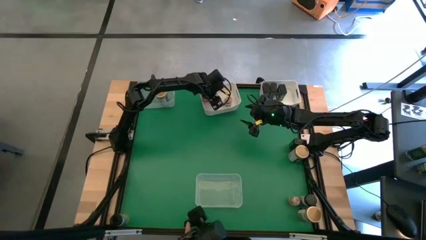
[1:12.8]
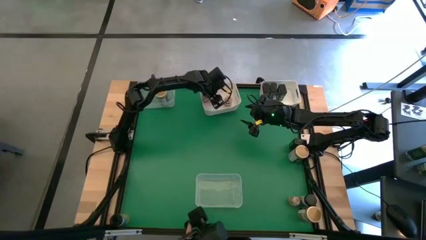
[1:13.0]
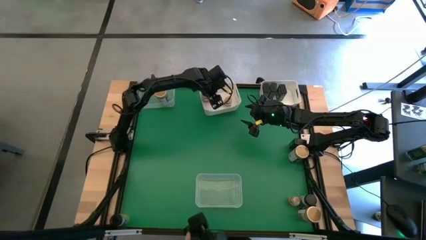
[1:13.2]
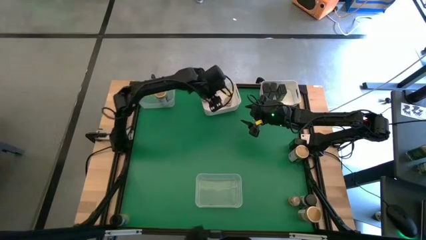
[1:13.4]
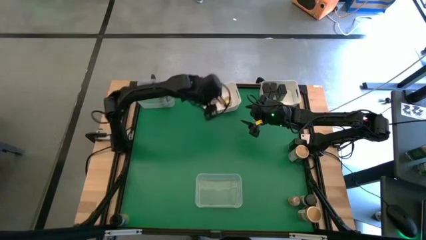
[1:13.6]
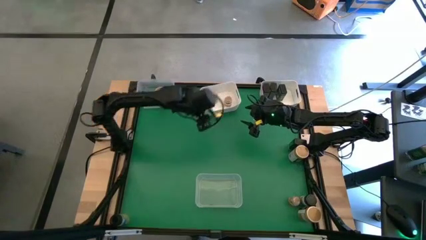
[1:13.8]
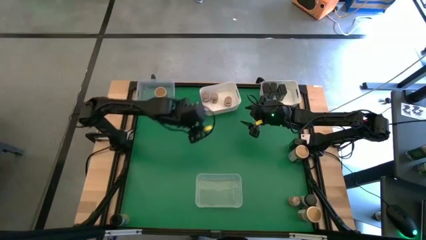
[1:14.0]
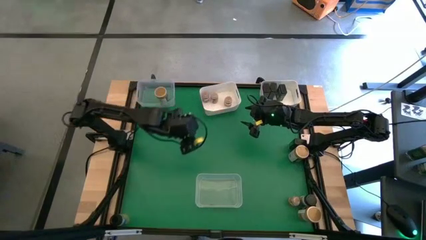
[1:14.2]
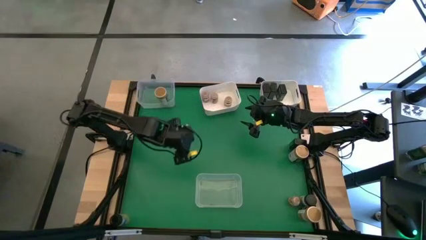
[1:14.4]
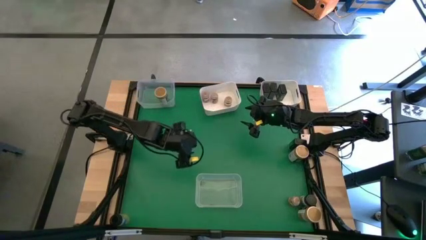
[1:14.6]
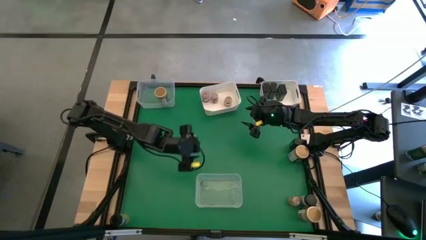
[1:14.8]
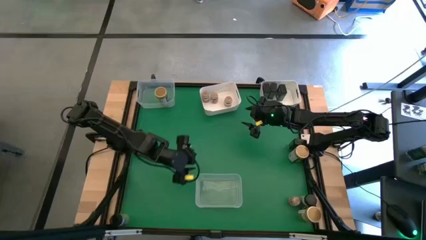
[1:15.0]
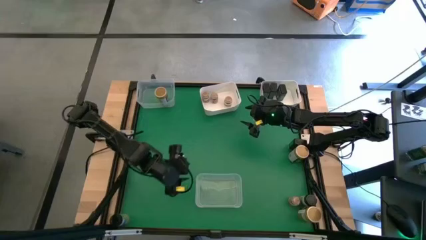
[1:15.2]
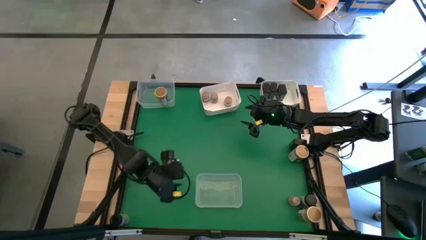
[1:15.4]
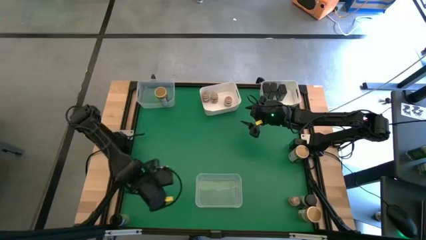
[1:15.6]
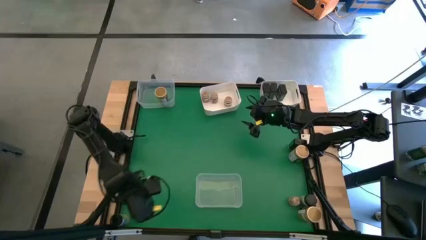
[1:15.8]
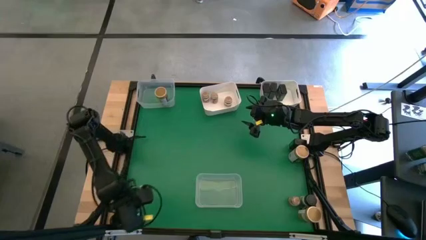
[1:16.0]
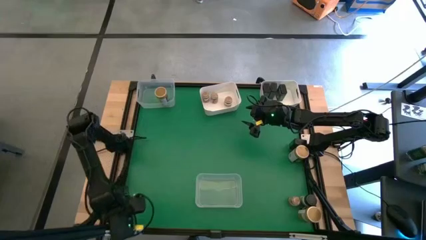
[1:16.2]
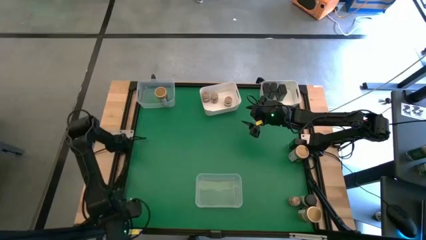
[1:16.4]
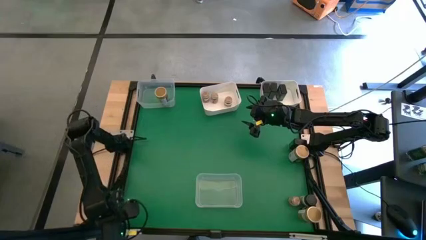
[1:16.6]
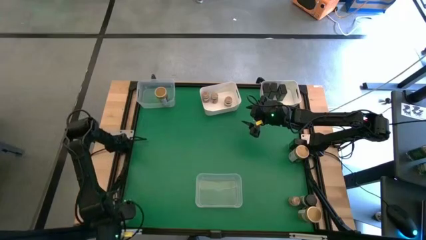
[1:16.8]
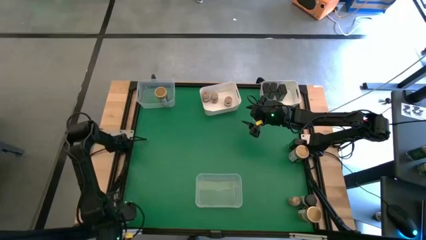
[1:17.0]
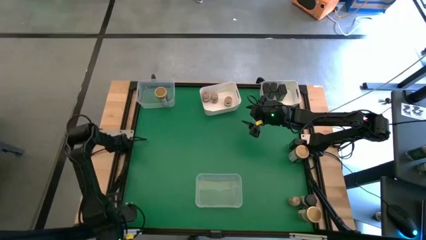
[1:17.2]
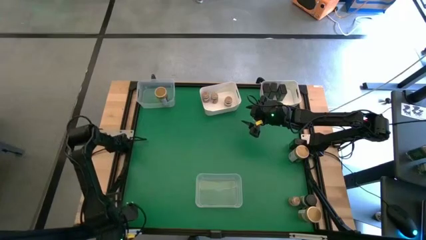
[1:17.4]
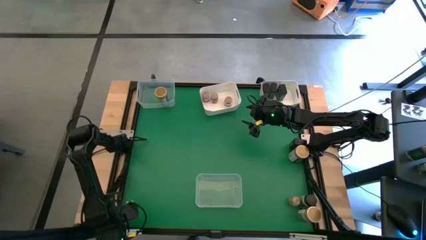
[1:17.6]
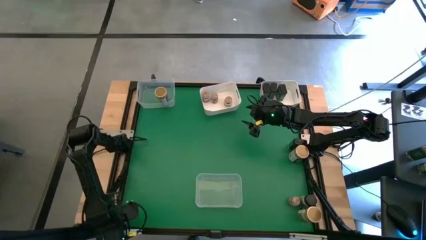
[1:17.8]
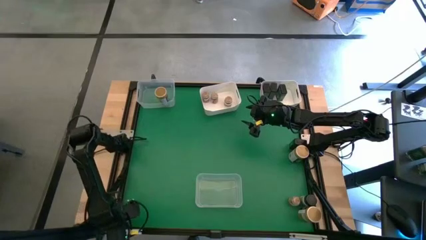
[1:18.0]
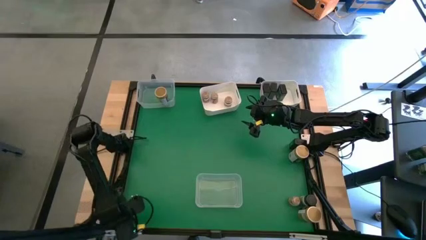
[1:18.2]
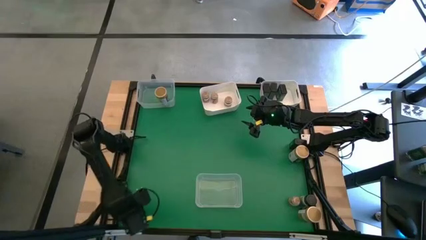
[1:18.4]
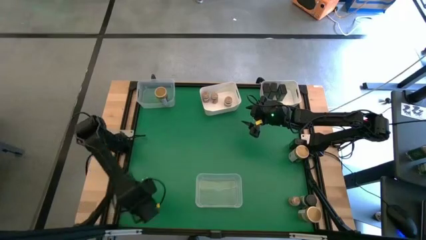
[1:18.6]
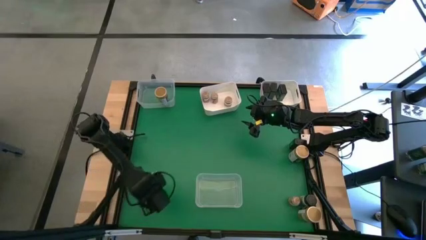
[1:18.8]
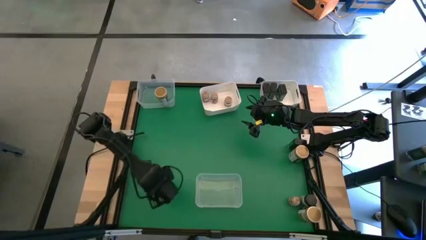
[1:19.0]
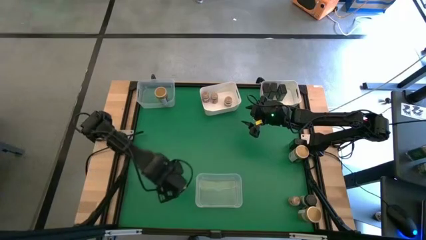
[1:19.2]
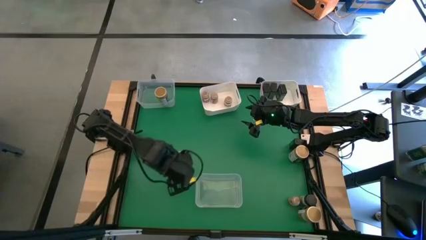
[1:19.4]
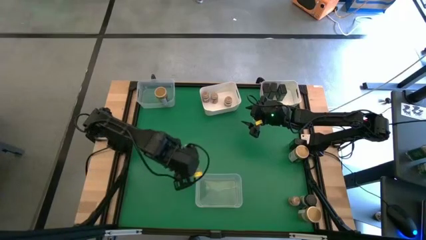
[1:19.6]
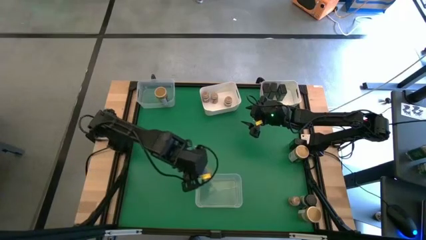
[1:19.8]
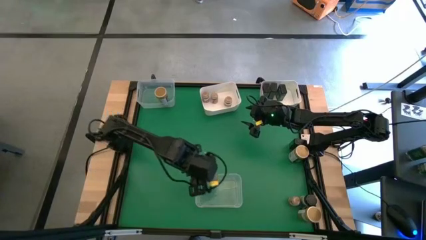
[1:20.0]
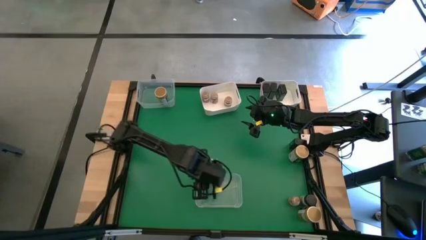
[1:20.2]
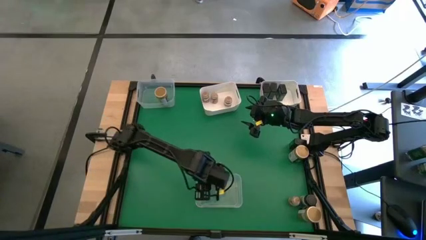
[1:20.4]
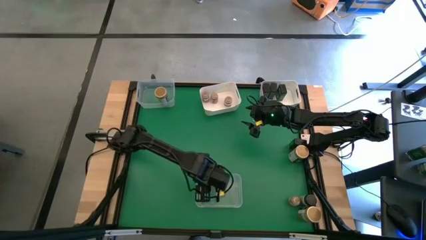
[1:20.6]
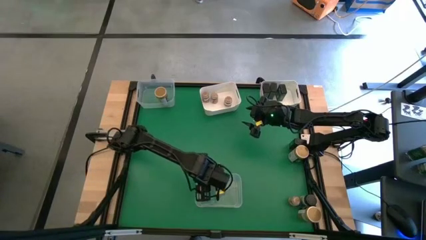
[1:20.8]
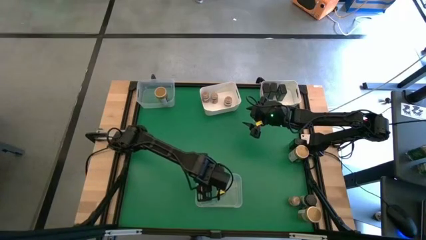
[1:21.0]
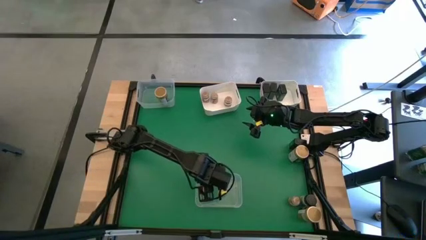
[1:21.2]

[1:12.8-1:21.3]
Task: Sort spices by type
Put the black seasoning bottle into the bottom transparent bin

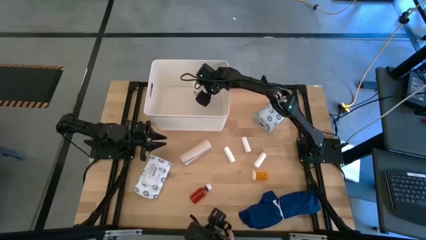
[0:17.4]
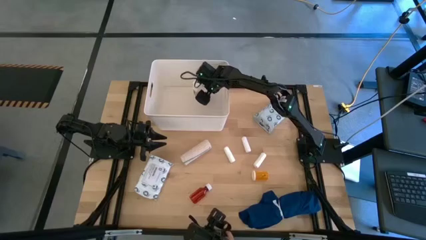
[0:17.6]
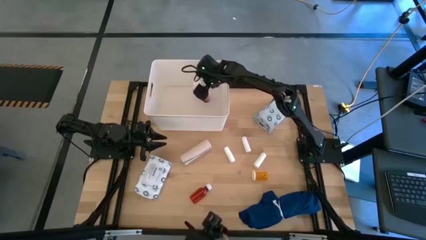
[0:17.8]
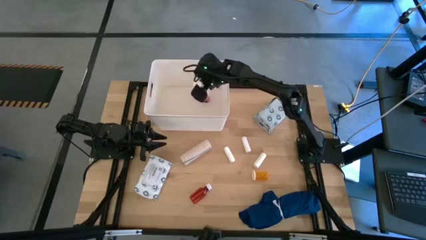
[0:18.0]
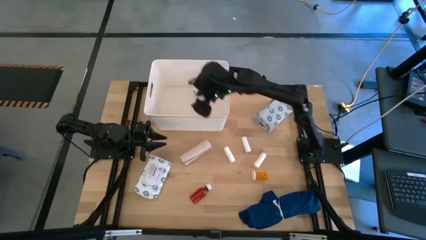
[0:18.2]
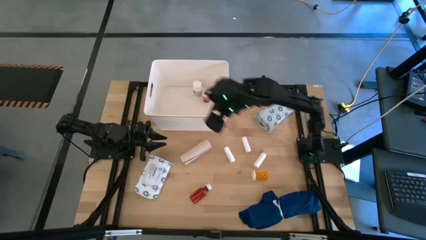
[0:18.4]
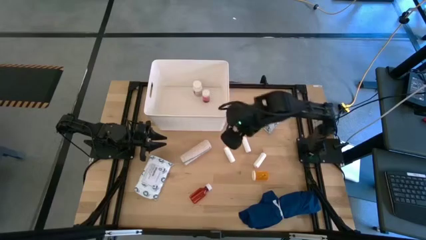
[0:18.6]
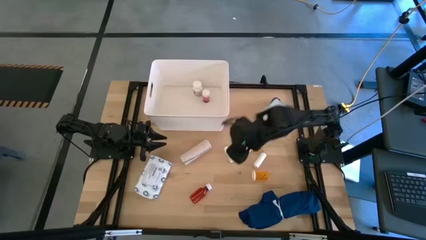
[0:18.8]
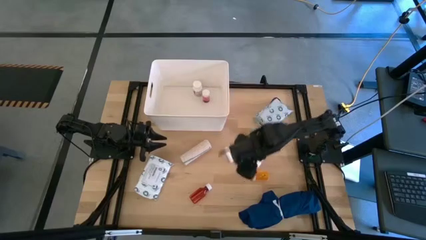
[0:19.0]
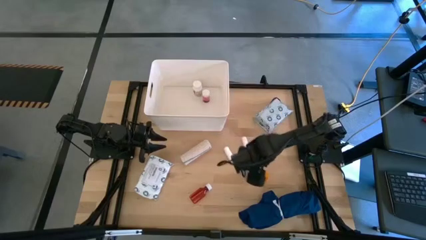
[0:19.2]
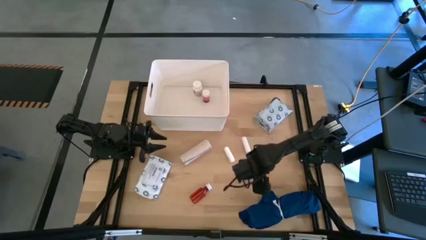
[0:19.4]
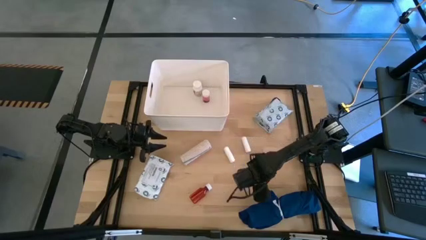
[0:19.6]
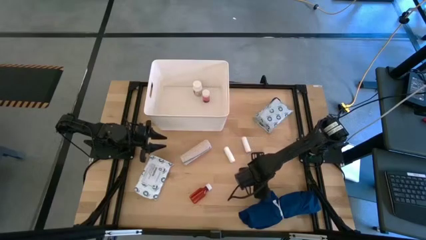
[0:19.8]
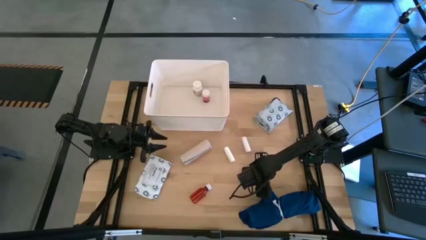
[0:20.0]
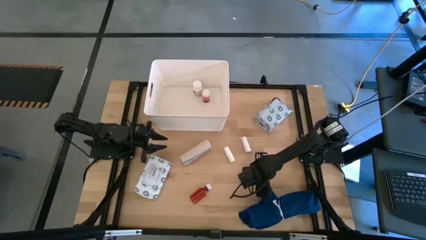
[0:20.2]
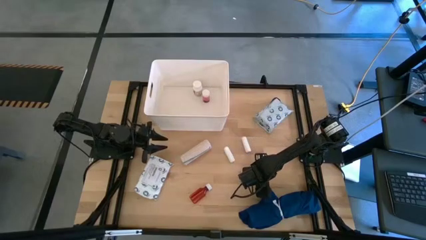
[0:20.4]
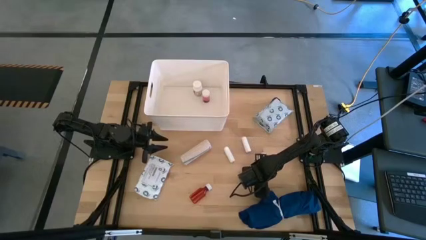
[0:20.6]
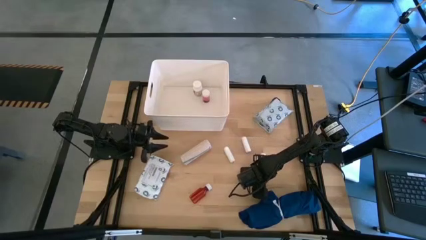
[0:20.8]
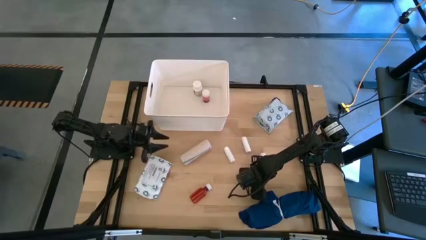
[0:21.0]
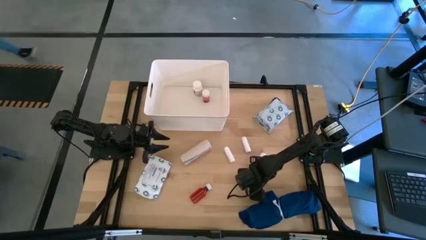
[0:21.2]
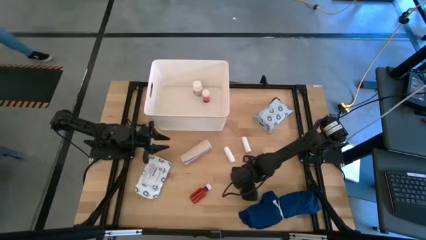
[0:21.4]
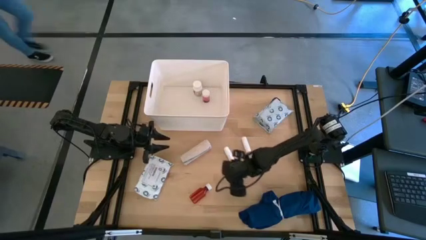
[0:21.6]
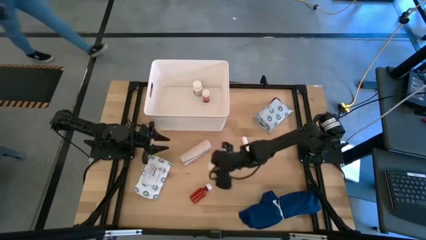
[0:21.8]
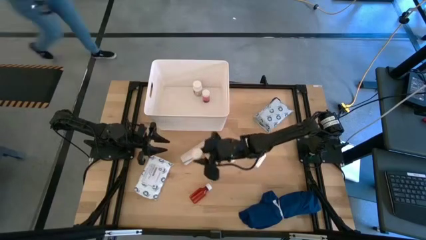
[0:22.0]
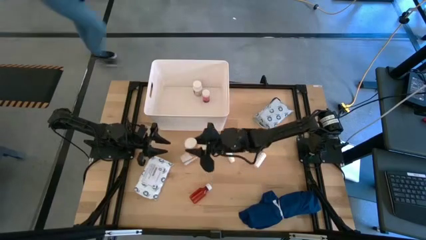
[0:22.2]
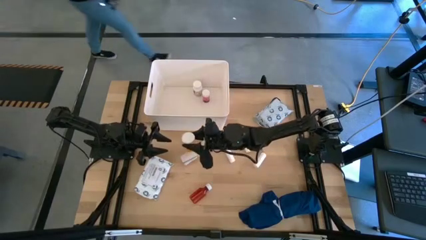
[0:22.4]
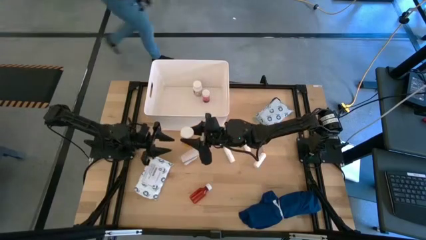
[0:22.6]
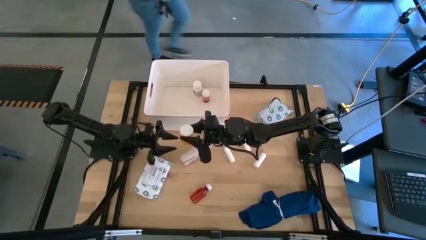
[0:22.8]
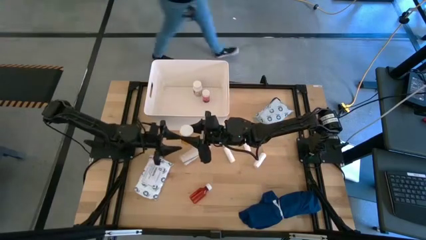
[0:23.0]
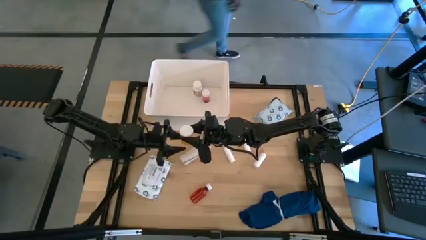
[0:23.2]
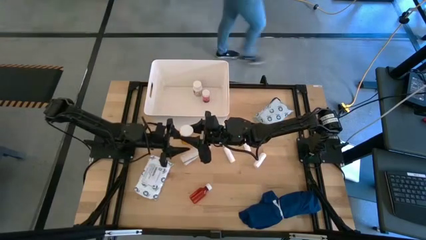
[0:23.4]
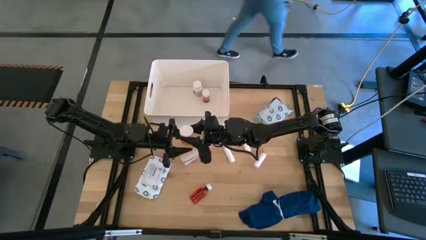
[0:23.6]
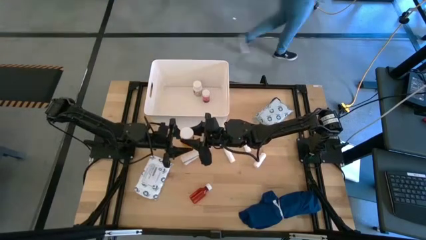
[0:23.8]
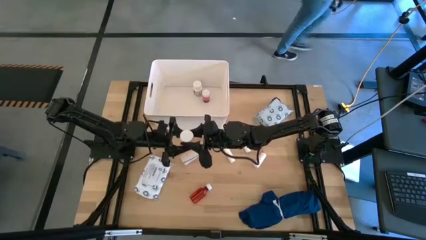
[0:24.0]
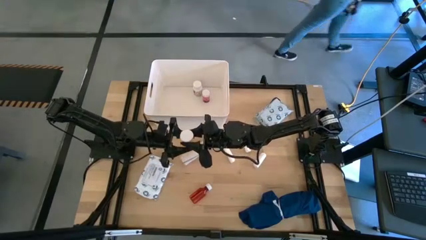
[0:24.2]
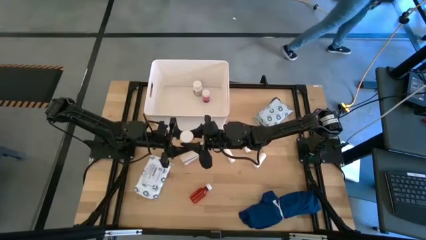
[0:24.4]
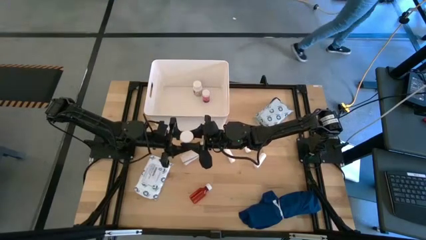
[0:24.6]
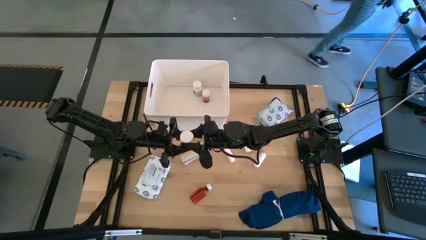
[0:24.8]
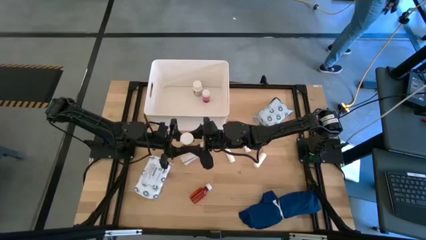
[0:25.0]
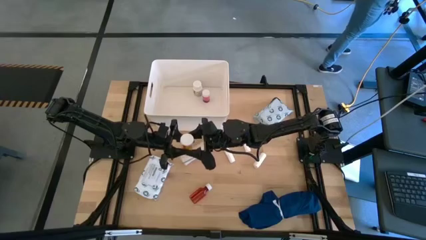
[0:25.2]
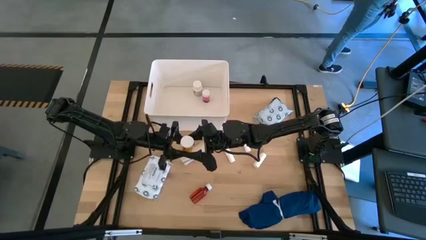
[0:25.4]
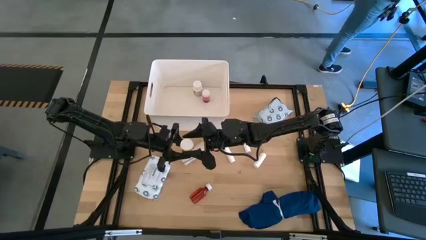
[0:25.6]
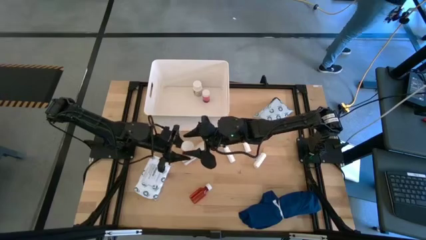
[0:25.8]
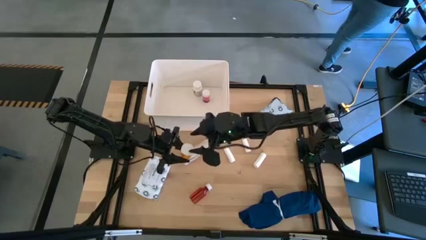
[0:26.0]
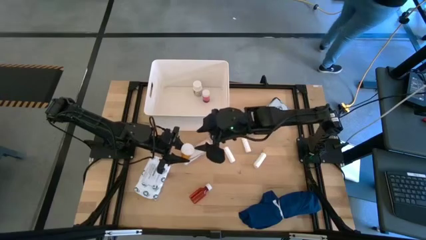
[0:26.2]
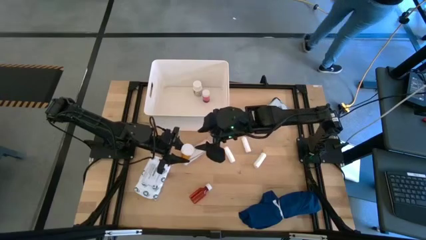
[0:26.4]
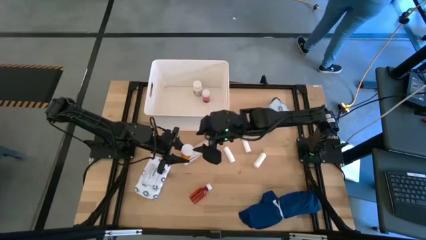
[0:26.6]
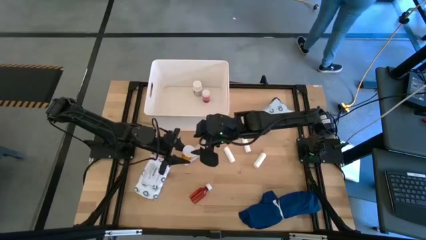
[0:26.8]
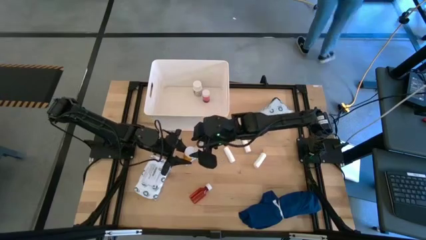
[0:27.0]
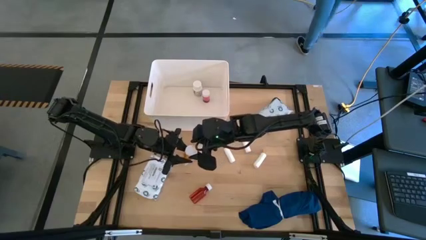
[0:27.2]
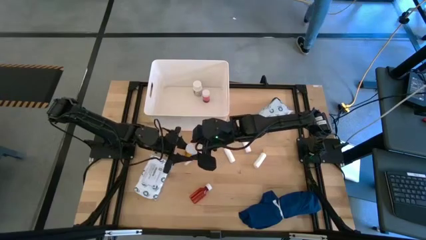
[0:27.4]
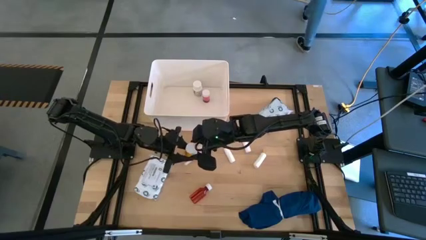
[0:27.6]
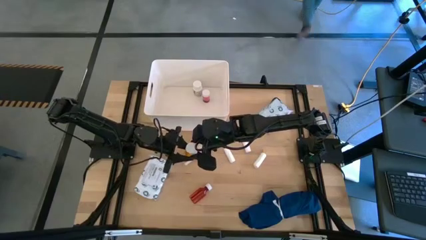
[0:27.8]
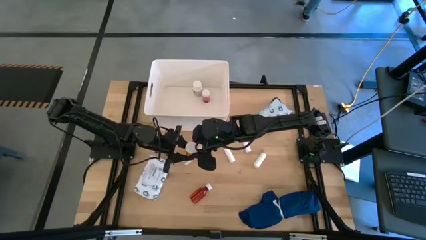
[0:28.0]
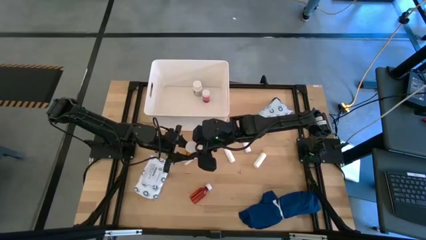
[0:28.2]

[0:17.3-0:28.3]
Task: Pick & place medical supplies in basket/bin
Put the orange medicine bottle into the white bin
